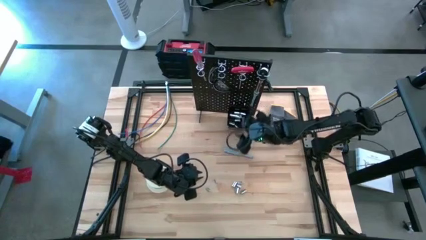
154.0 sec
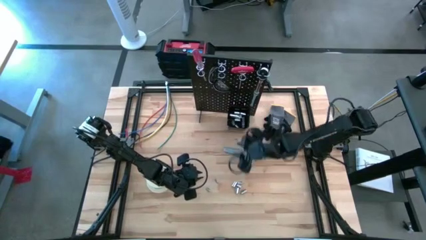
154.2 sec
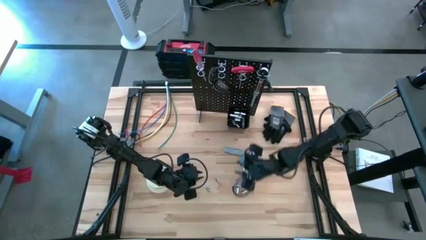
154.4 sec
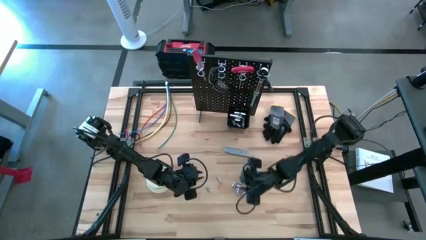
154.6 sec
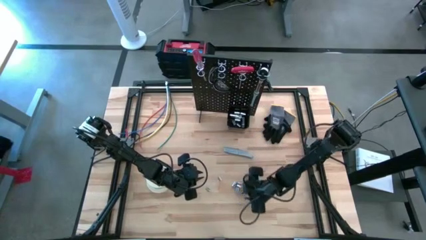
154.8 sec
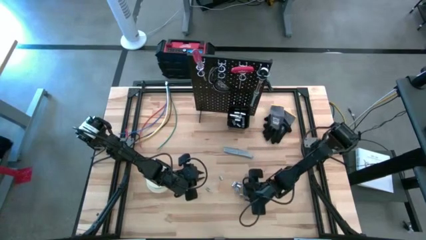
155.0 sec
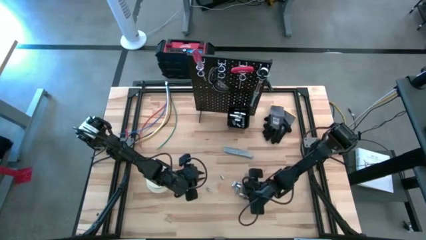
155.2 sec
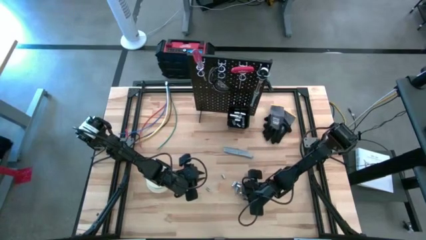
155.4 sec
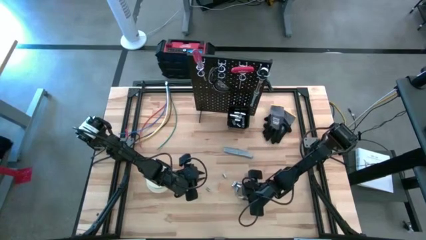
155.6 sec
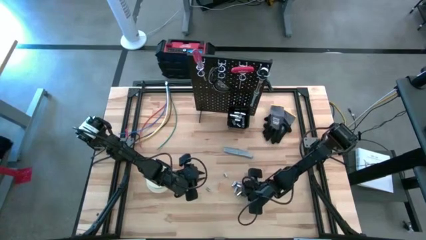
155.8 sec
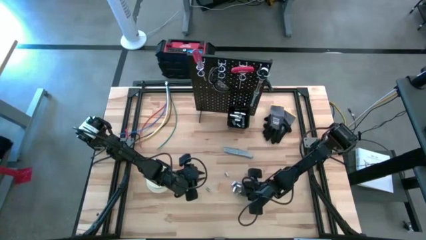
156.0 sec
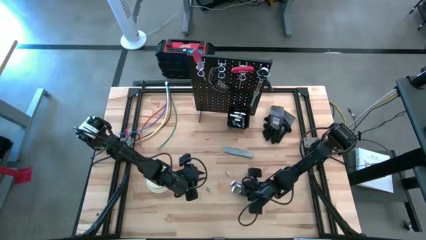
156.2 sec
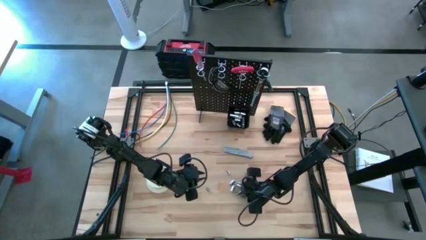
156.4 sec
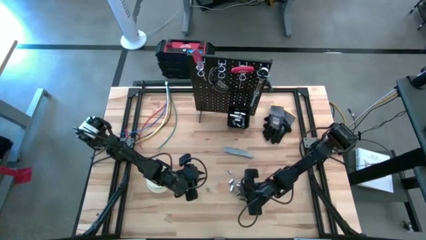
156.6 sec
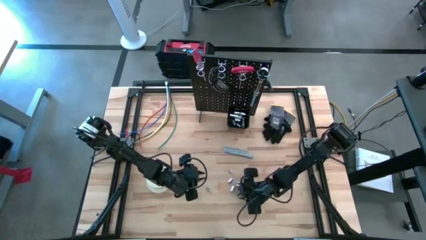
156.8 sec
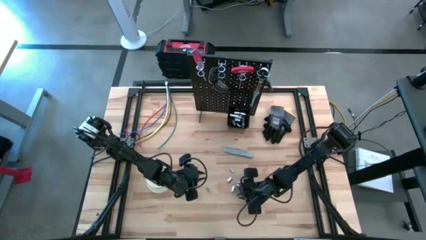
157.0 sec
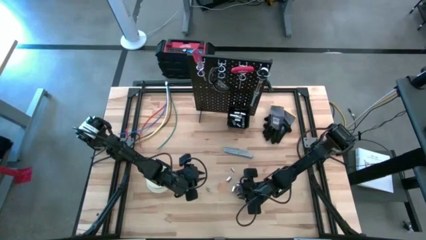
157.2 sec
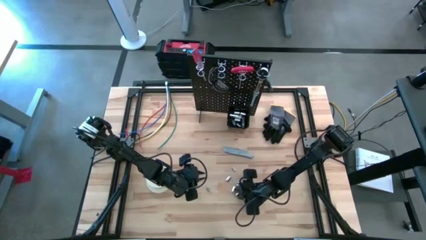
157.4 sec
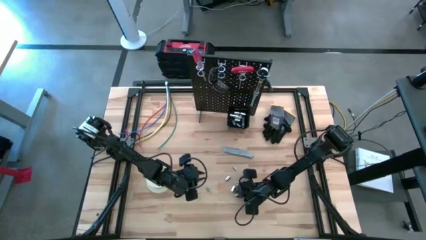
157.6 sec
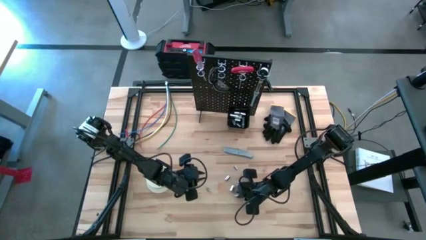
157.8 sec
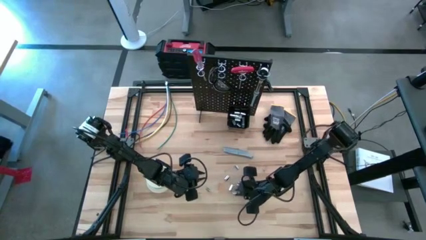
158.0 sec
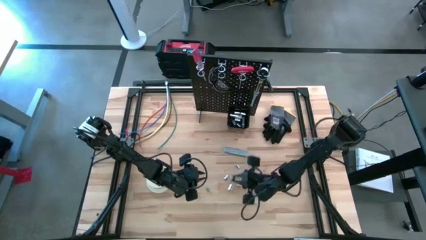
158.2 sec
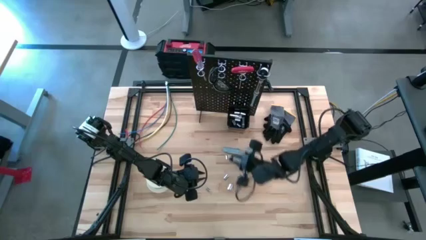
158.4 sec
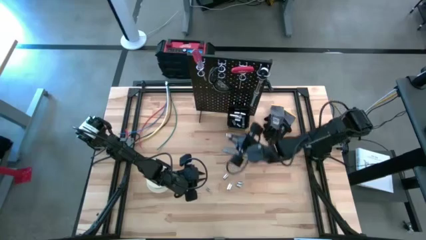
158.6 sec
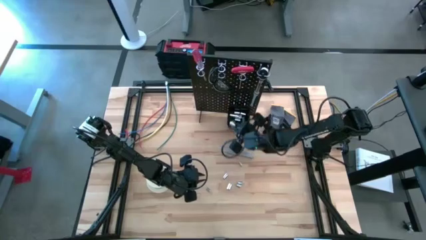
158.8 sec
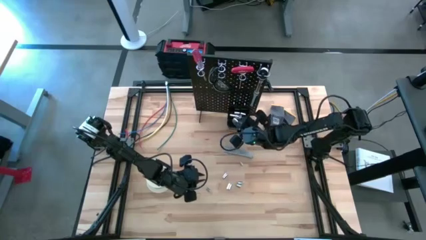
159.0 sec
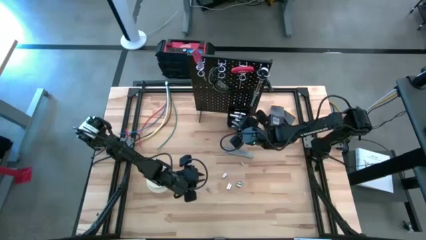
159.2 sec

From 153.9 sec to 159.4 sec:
Task: Hang tools onto peg board
Put the socket into the black bin on the peg board

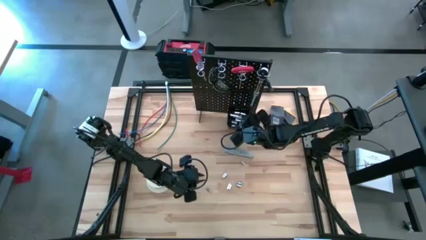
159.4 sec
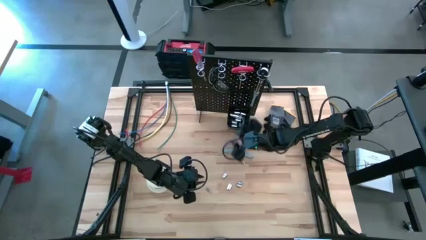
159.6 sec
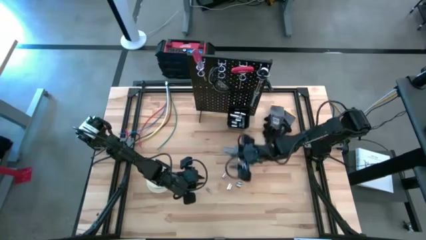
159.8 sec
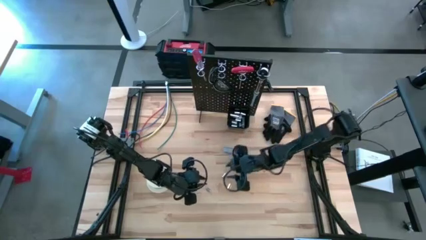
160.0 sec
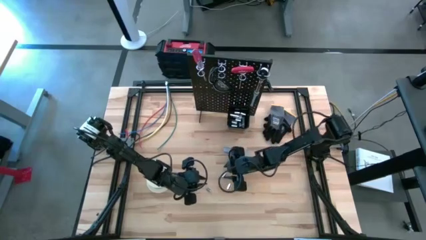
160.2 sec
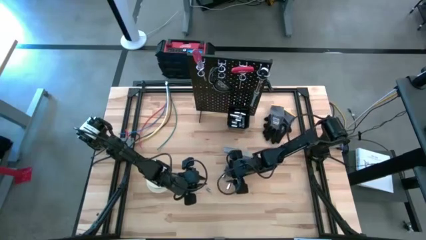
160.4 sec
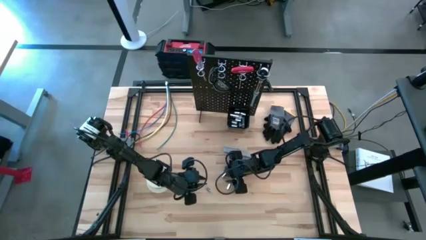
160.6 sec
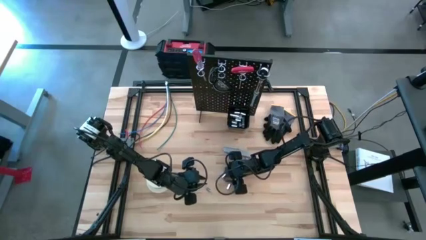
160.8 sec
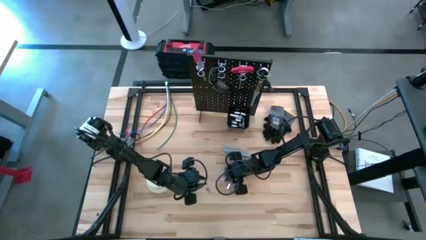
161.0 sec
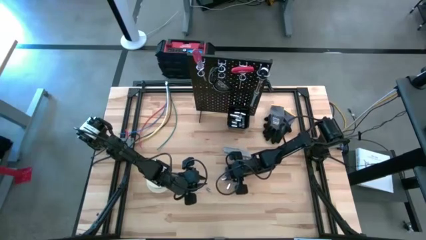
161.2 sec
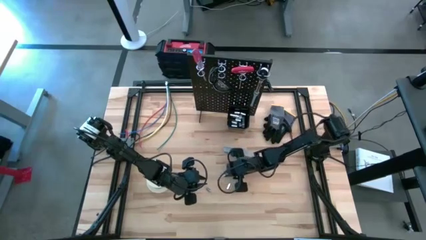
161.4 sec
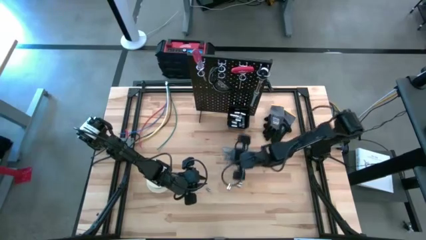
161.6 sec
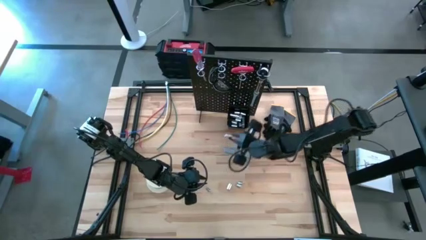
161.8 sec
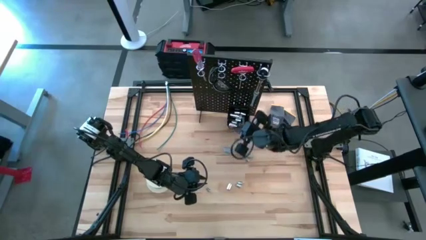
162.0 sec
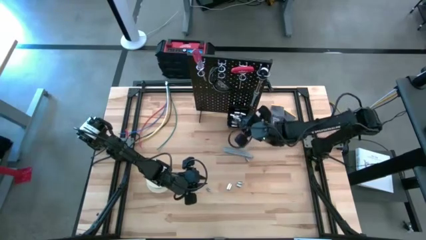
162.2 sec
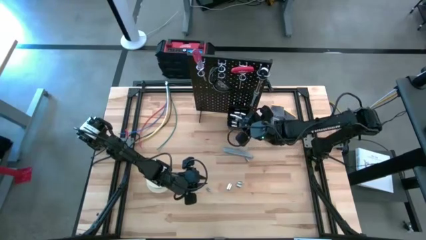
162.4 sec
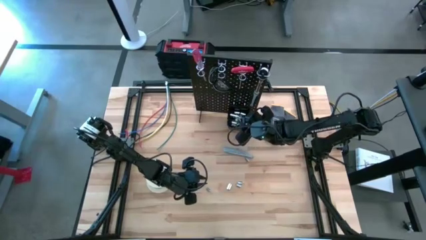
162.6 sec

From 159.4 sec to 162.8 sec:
Put the socket into the black bin on the peg board

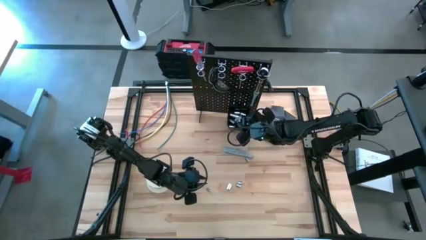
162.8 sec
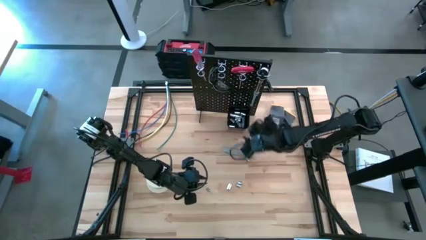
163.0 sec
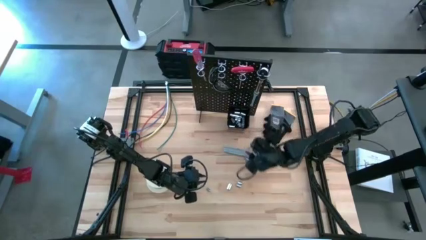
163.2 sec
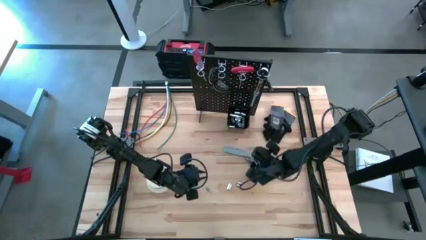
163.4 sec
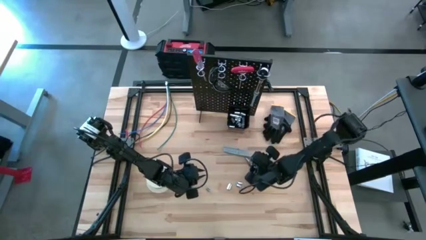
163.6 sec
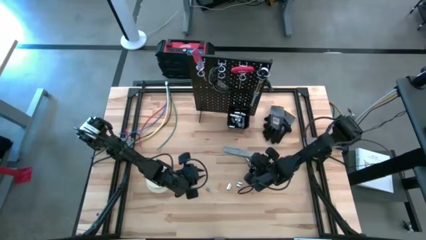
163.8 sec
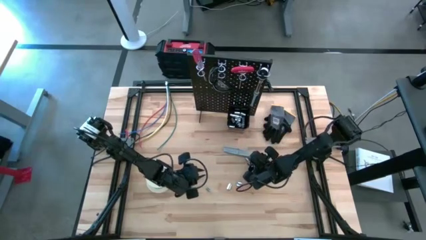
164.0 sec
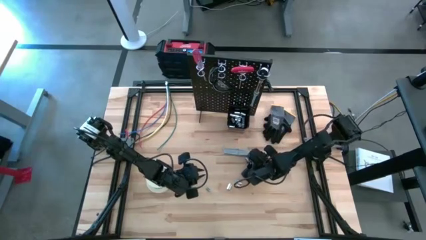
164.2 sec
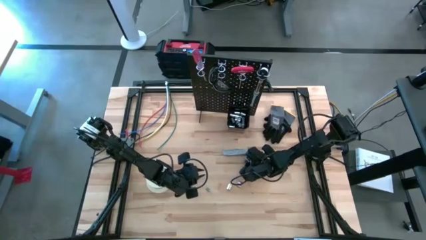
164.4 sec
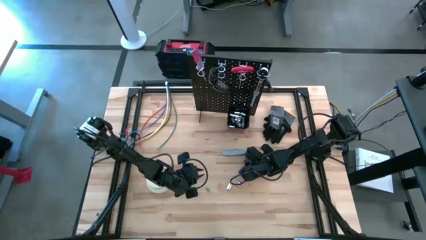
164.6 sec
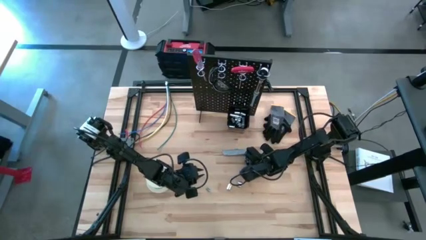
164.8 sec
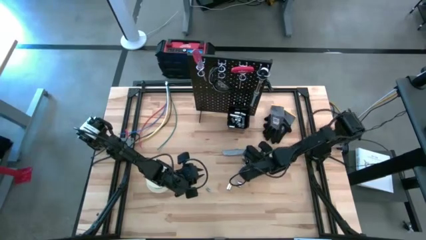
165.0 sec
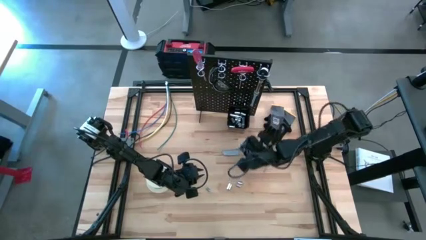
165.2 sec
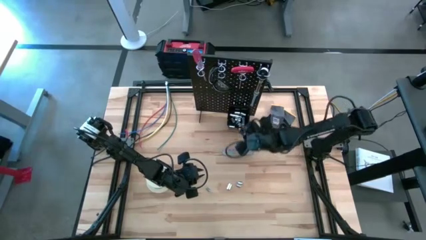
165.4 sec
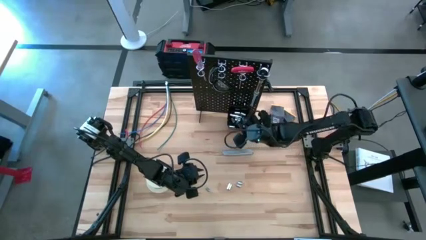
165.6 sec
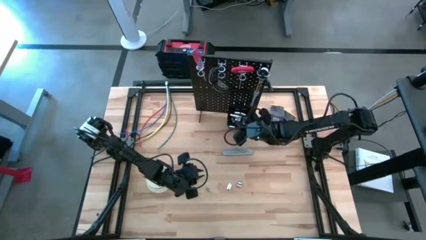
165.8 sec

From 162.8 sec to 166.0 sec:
Put the socket into the black bin on the peg board

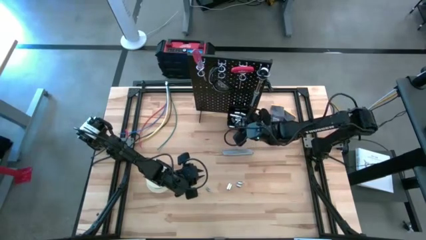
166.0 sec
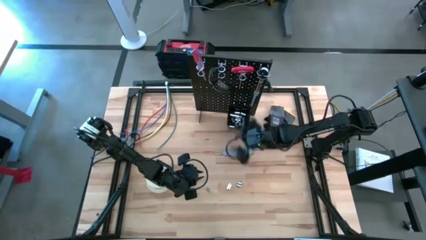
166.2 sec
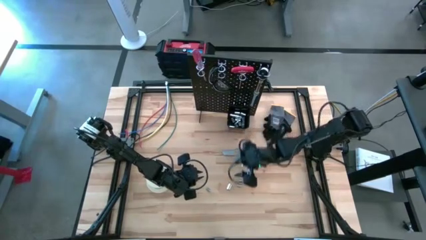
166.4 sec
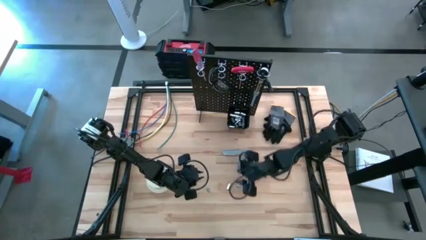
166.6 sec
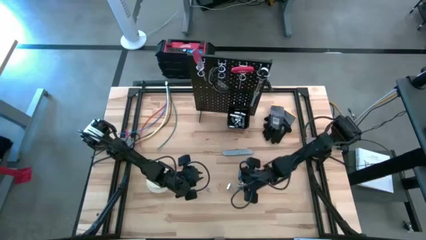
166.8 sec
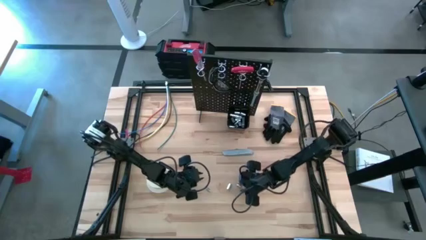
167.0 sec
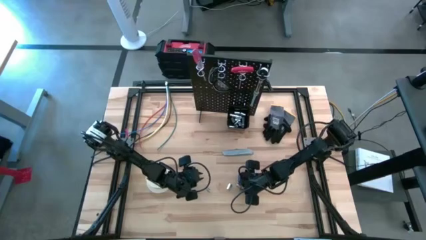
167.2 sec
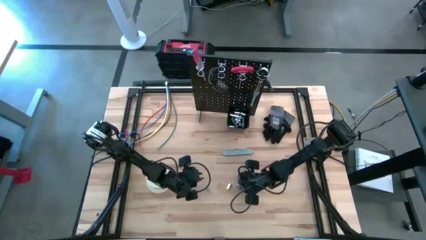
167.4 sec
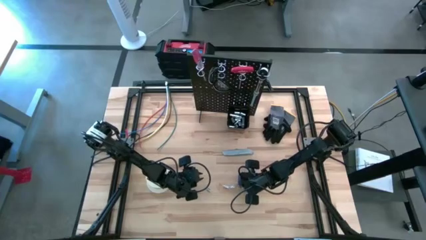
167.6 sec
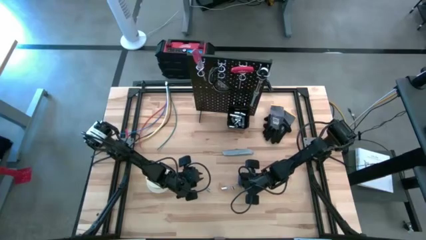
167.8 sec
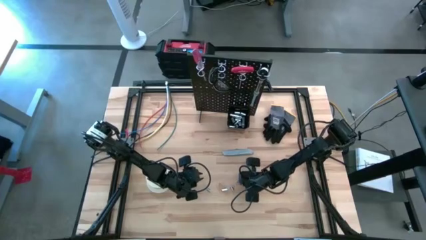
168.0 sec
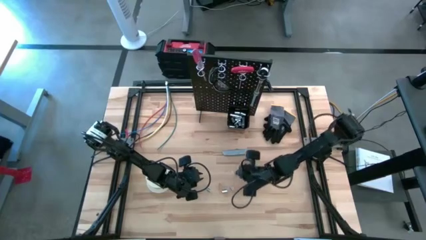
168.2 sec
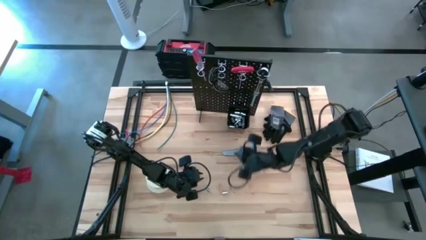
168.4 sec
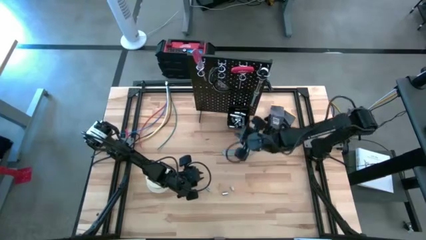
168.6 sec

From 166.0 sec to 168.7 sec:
Put the socket into the black bin on the peg board

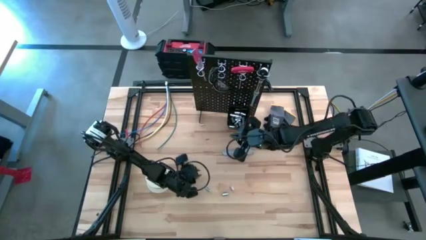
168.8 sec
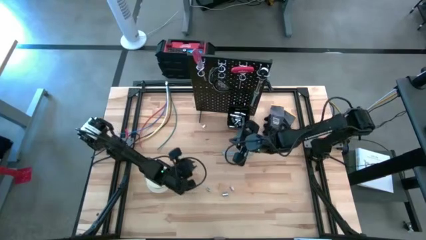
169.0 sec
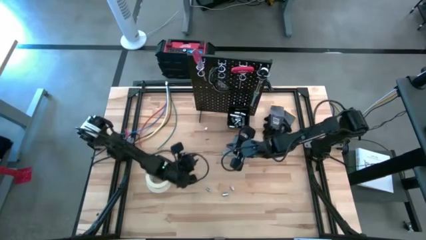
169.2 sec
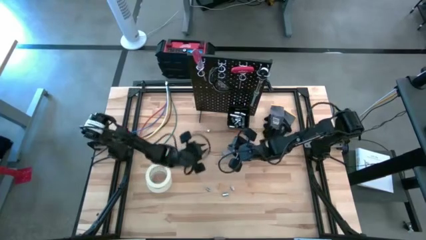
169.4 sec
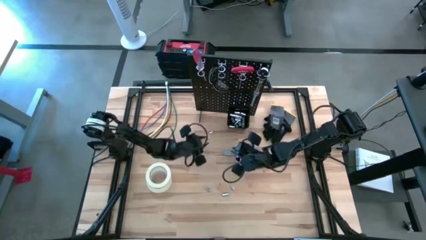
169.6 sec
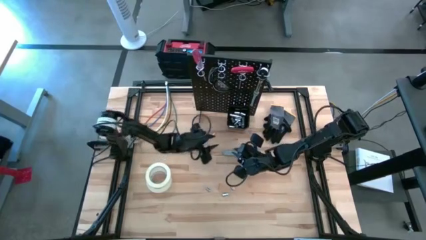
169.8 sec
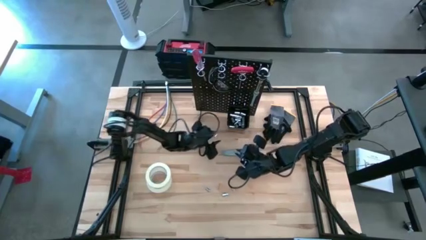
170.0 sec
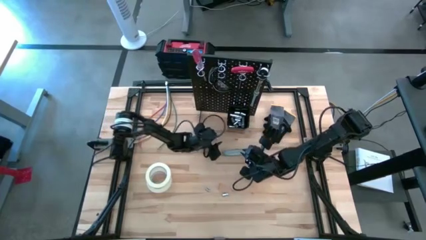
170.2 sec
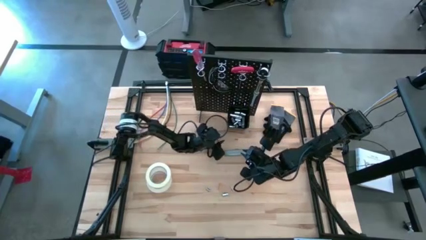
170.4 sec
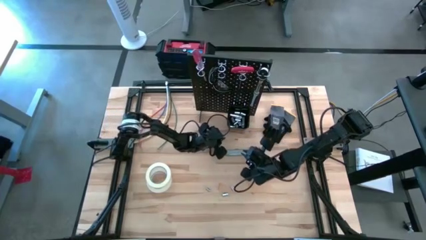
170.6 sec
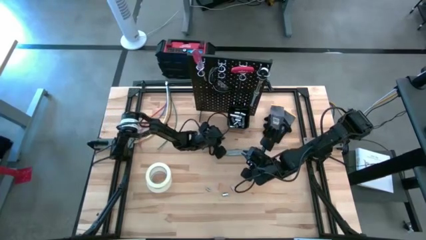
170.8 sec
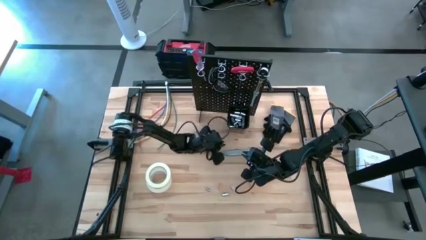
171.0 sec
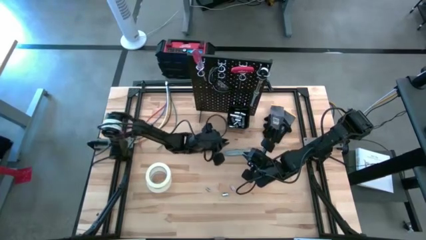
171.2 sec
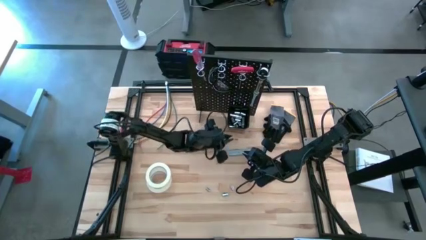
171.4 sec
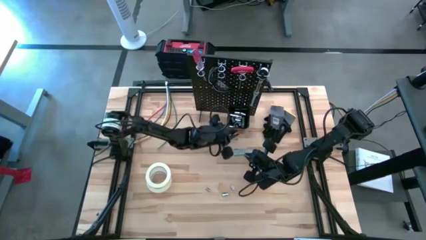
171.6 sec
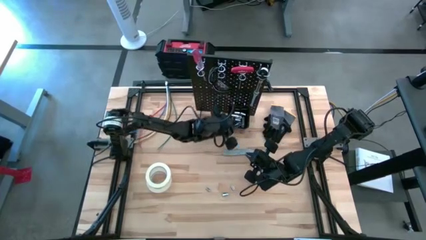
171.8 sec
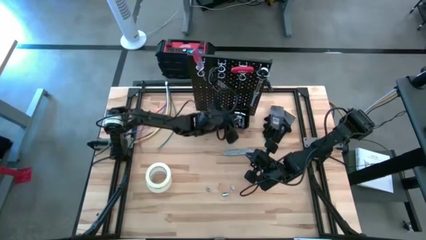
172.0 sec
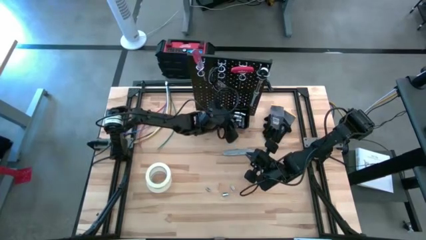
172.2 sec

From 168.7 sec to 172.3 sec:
Put the socket into the black bin on the peg board
